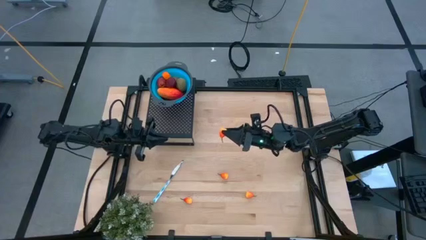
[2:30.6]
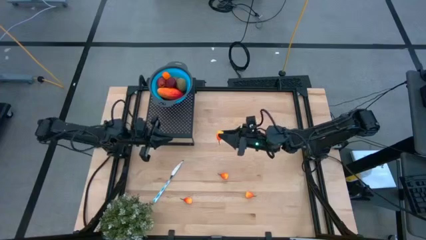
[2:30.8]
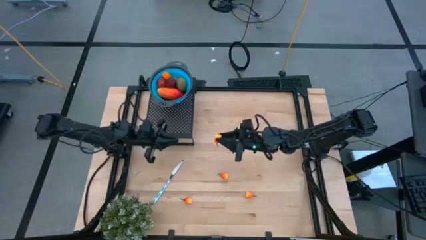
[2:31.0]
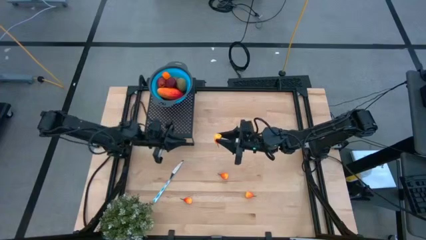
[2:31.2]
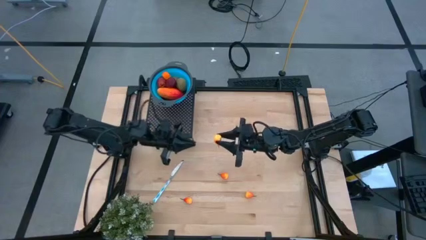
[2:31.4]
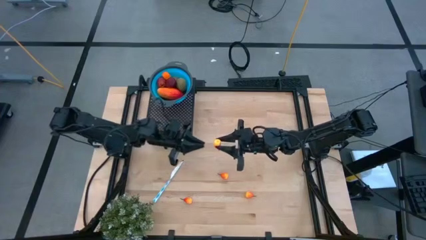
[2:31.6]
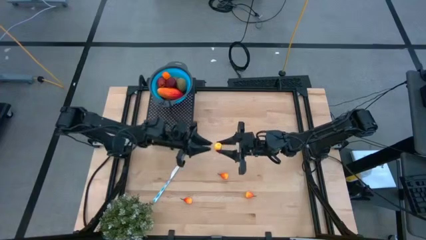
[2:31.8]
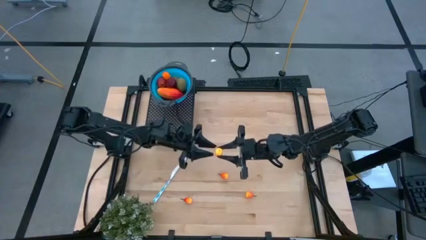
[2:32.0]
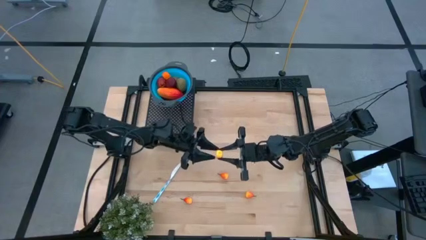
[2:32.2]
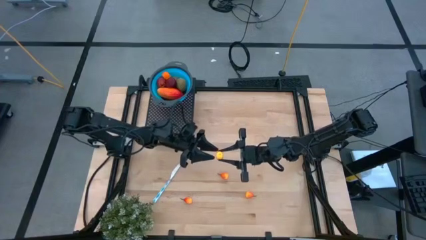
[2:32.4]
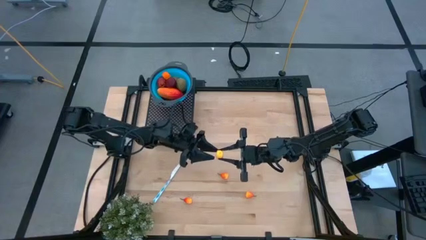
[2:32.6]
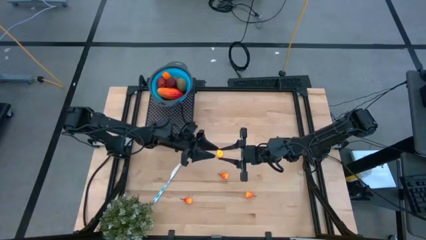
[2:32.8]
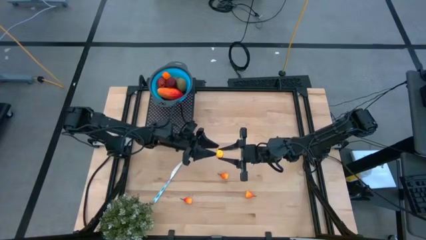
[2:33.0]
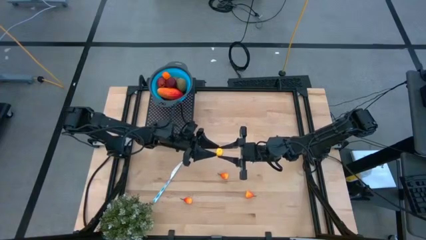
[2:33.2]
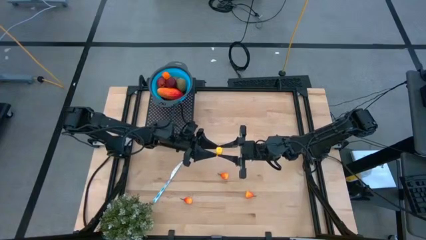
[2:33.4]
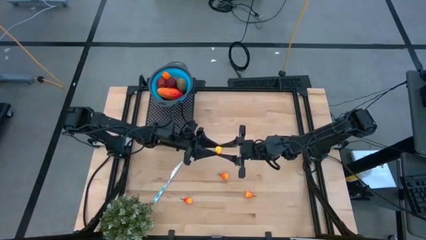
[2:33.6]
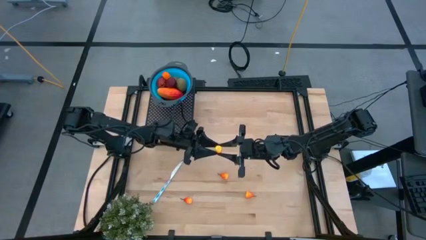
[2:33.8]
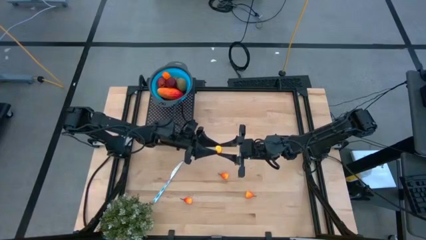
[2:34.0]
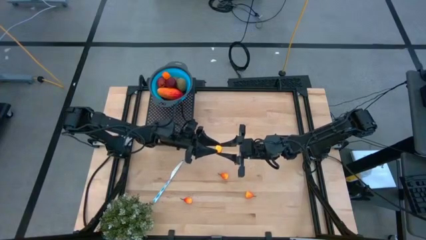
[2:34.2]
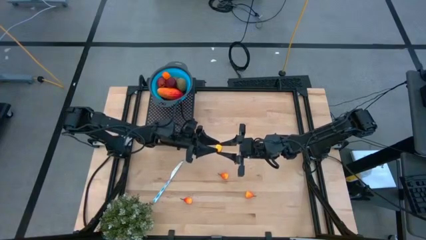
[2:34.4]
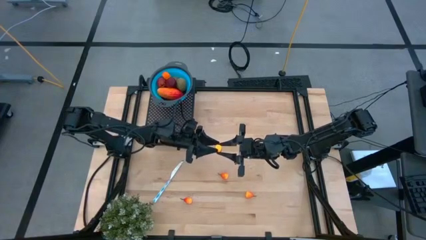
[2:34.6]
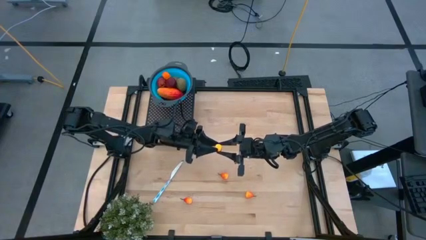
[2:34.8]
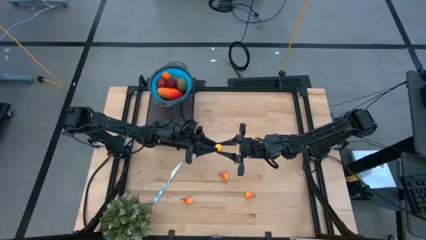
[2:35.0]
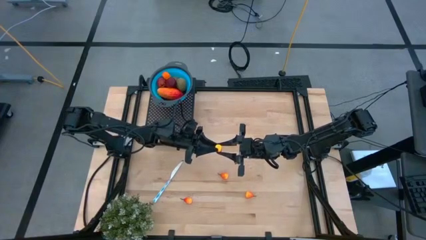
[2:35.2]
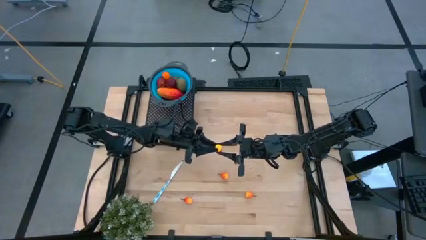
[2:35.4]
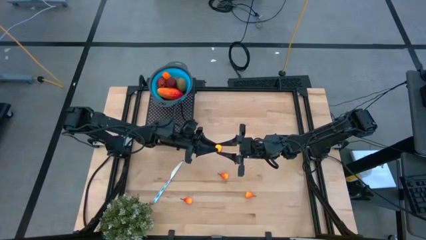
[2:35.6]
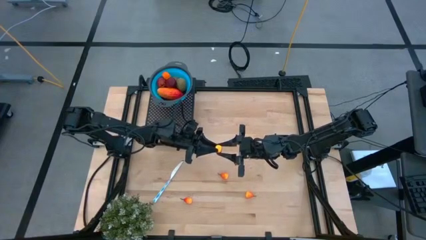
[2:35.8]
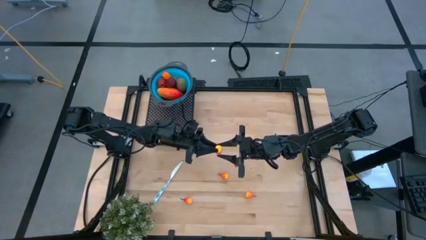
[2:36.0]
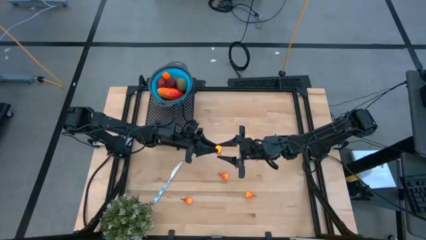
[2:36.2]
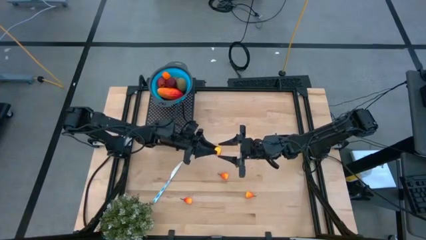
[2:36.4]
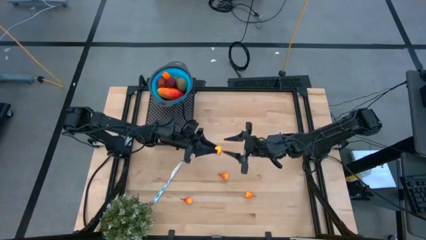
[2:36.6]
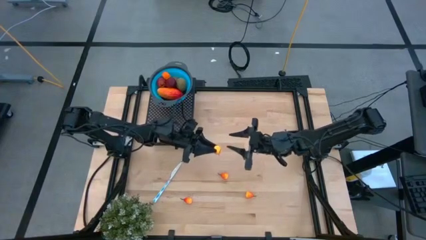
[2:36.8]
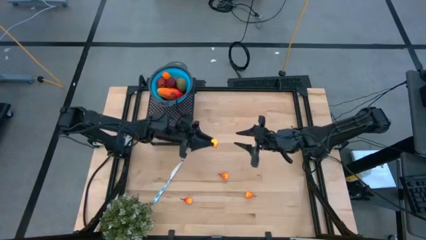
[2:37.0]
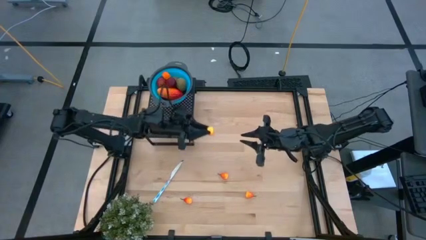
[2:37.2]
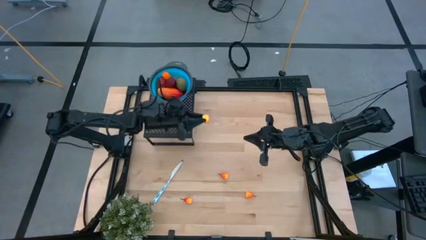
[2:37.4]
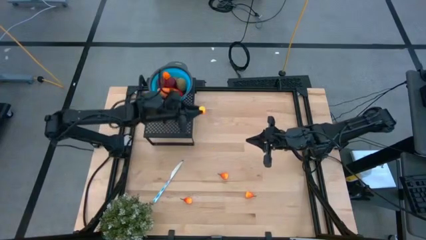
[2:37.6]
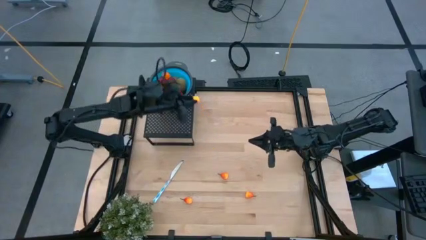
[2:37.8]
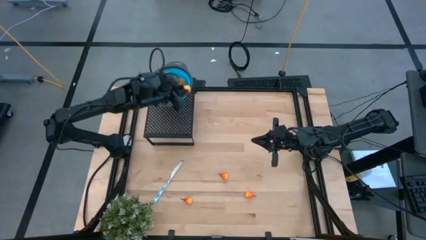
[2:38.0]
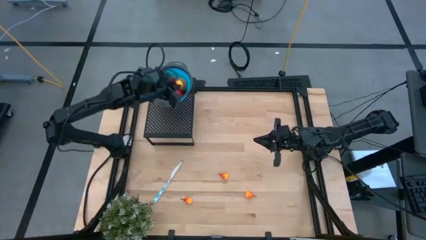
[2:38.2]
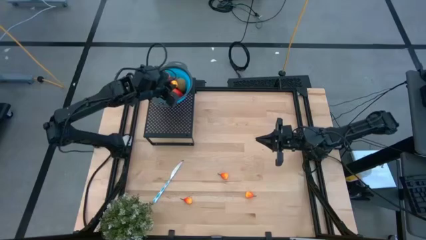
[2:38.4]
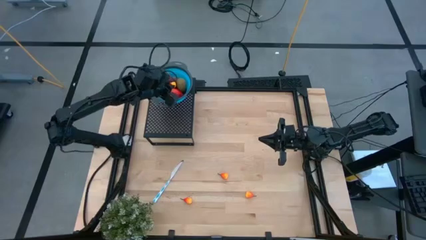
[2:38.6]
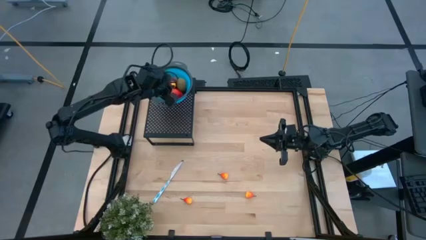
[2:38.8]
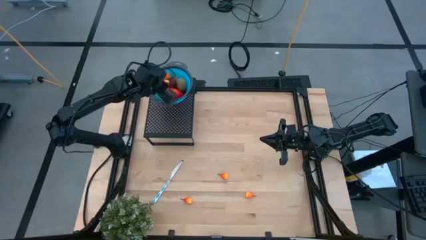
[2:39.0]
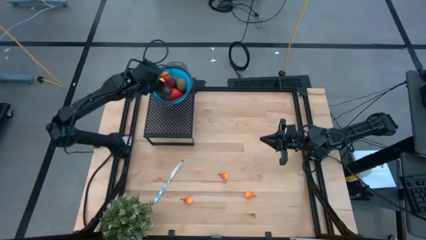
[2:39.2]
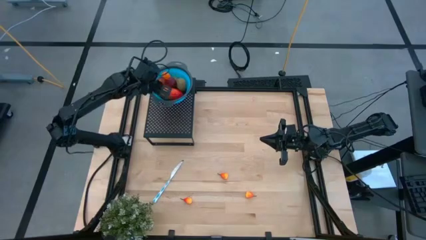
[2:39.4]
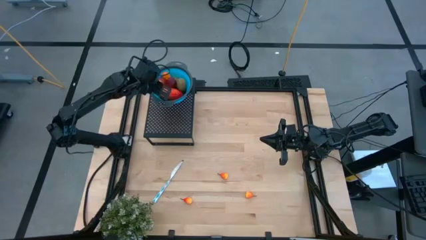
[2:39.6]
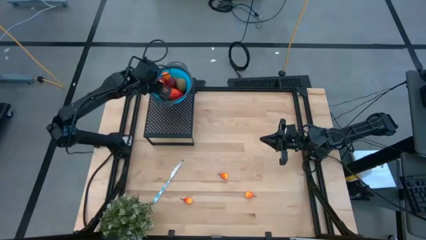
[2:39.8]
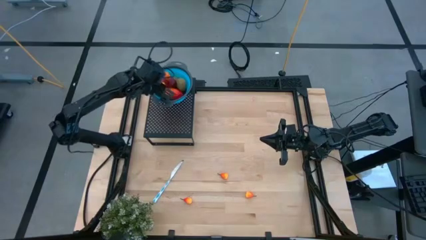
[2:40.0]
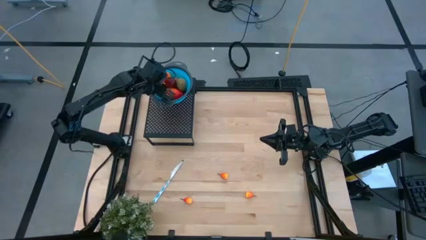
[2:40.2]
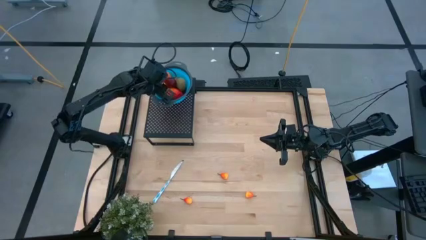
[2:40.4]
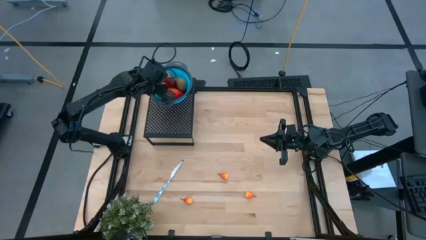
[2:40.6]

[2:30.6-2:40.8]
Task: Pick & Place Fruit
Put the orange pear into the blue strainer bowl on the shelf

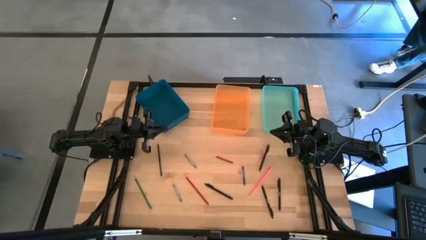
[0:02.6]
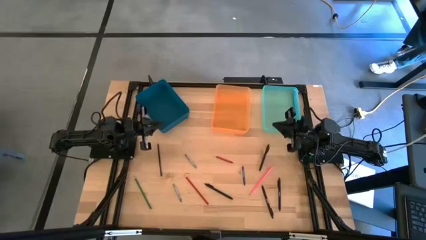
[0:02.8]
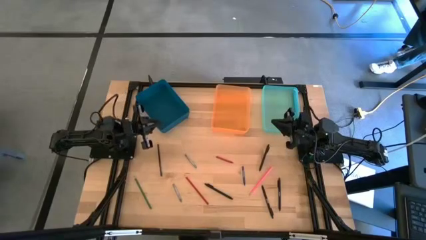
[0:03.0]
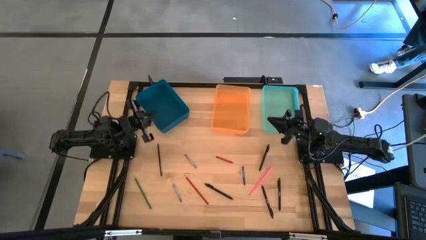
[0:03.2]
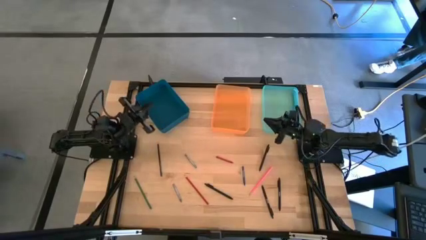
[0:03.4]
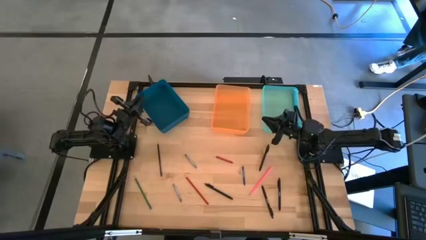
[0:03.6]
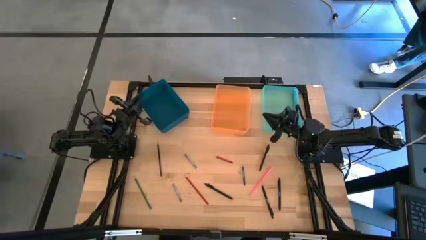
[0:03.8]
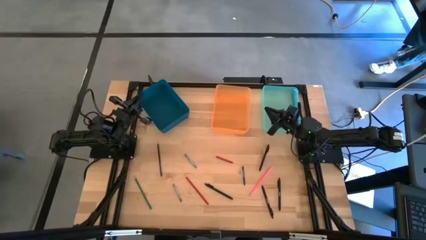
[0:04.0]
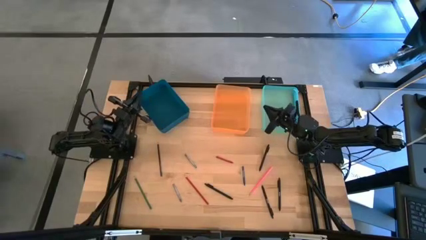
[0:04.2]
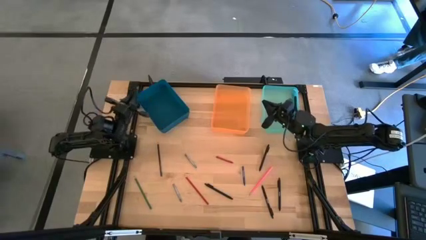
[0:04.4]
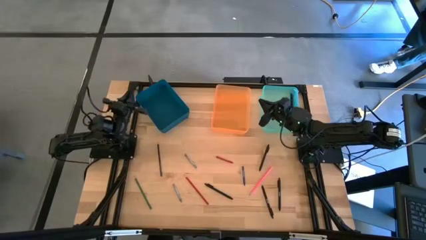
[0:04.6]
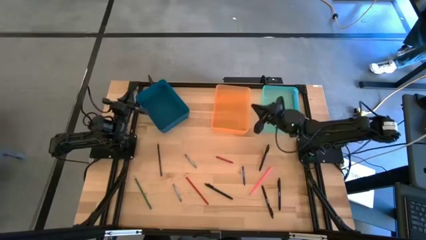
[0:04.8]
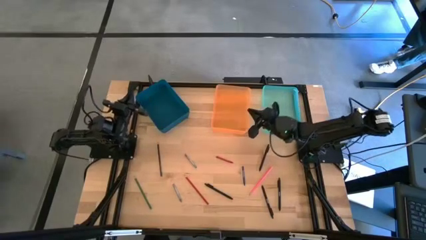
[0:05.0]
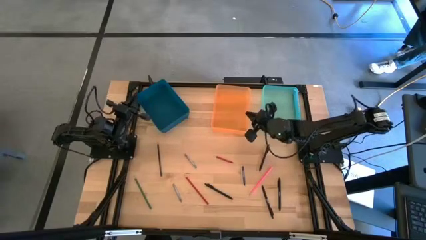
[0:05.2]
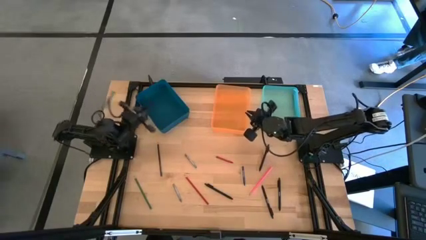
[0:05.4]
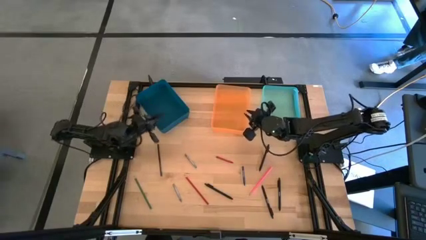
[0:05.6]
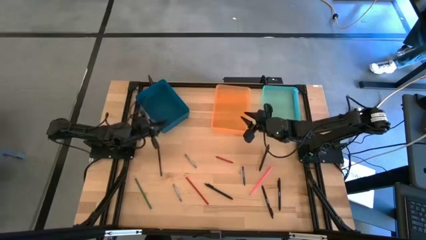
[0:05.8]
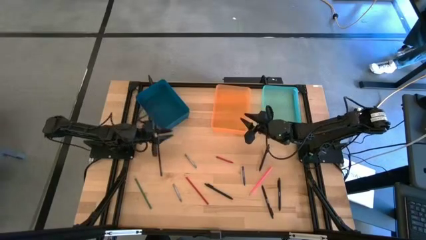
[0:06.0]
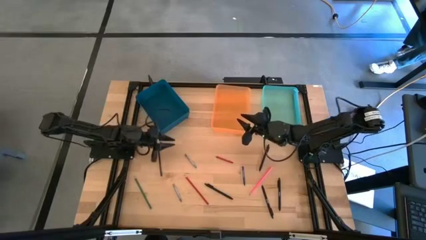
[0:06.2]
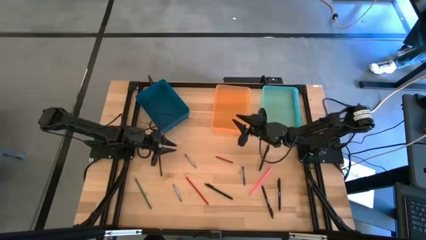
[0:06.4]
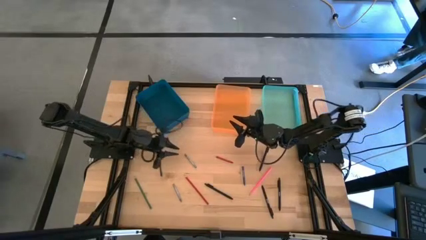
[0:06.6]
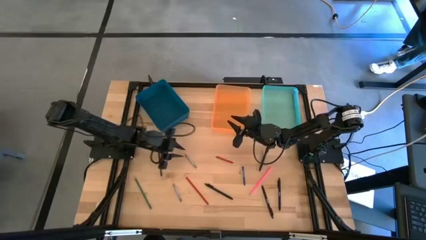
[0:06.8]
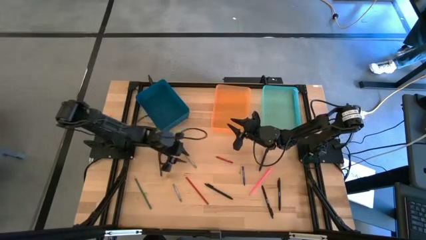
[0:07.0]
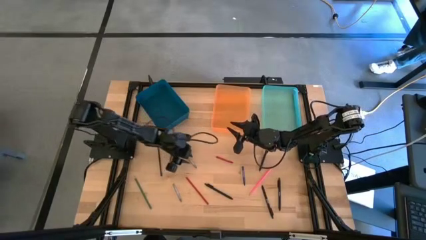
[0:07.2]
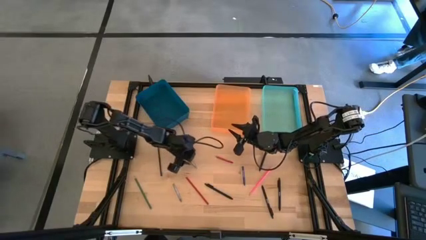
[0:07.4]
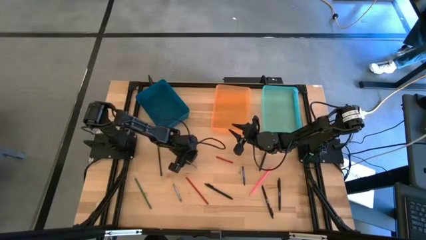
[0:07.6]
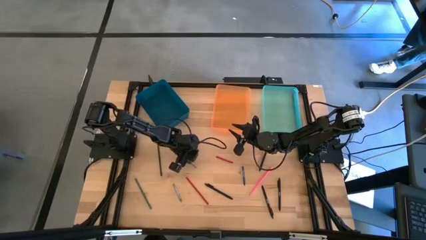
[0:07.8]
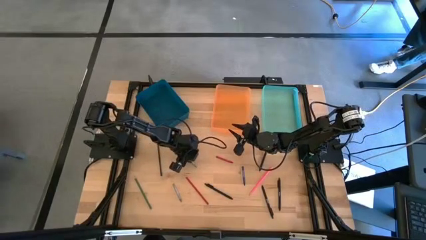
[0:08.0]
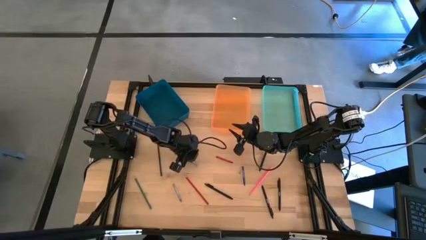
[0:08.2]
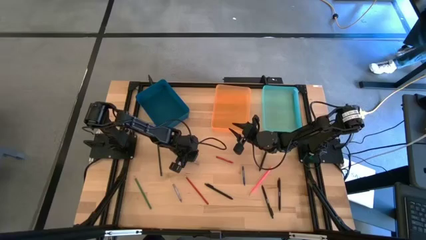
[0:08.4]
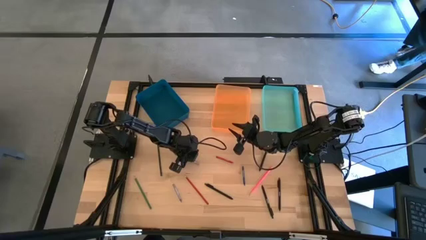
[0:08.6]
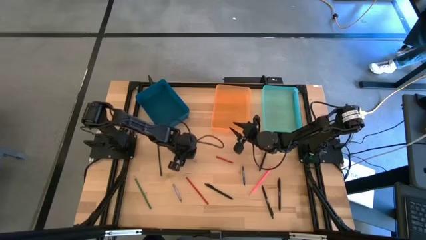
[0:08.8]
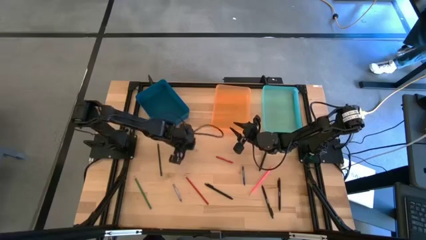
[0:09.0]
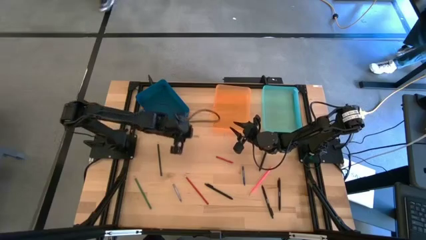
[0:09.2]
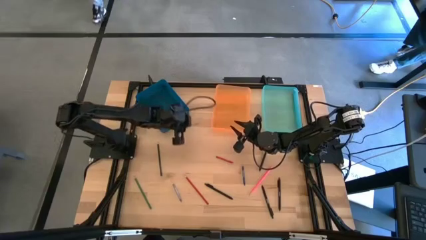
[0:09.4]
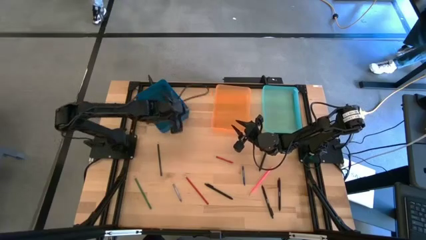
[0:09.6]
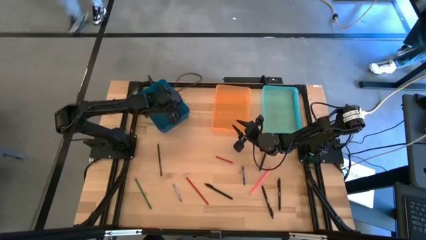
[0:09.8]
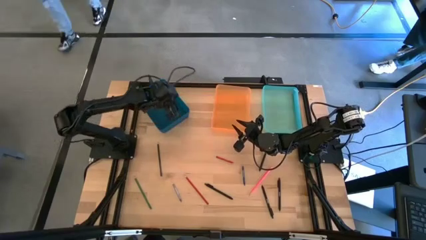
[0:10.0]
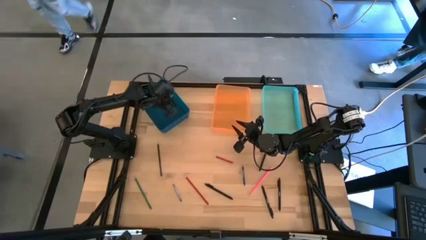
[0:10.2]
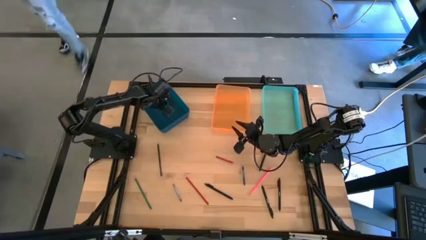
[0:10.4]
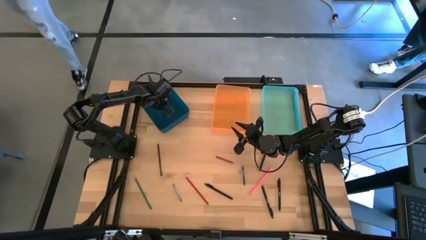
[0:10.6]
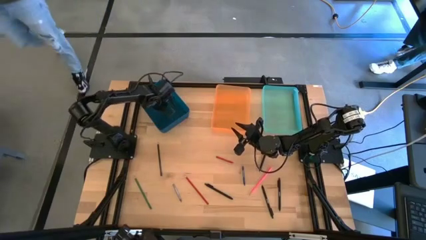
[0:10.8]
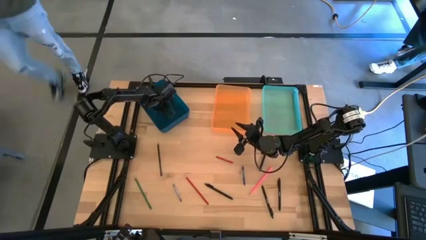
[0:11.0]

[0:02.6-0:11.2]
Task: Sort crayons/erasers/pens/pencils in bins
Put the gray crayon into the blue bin
